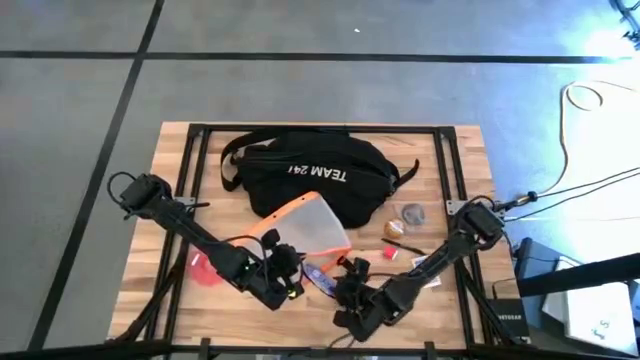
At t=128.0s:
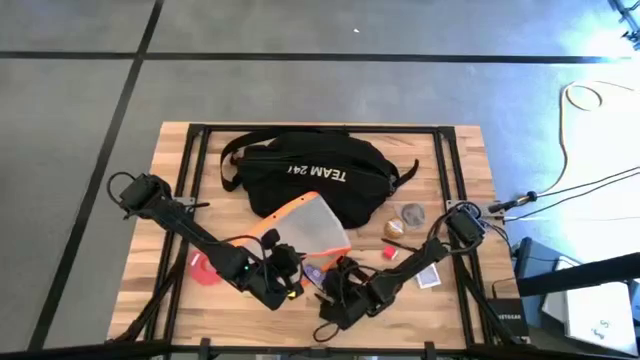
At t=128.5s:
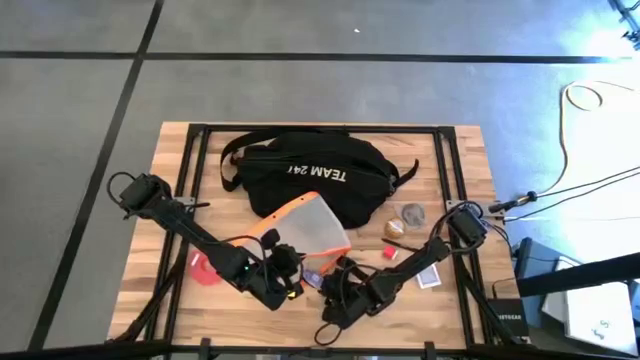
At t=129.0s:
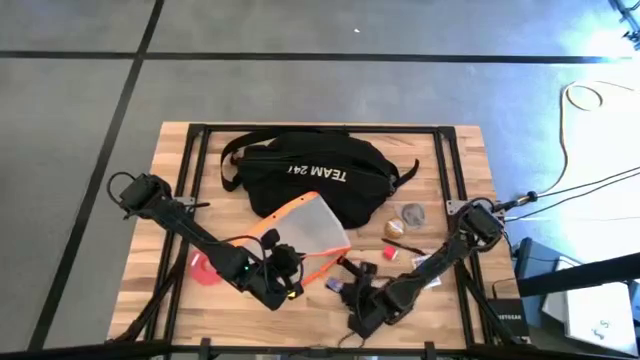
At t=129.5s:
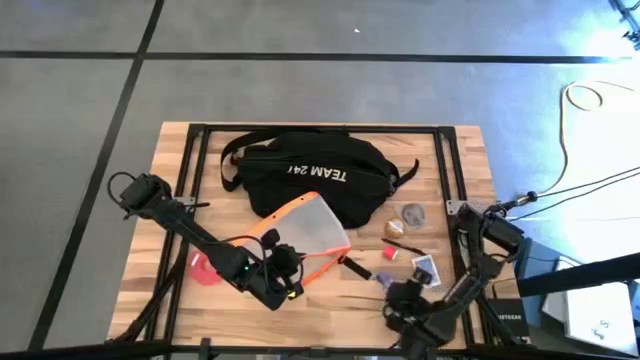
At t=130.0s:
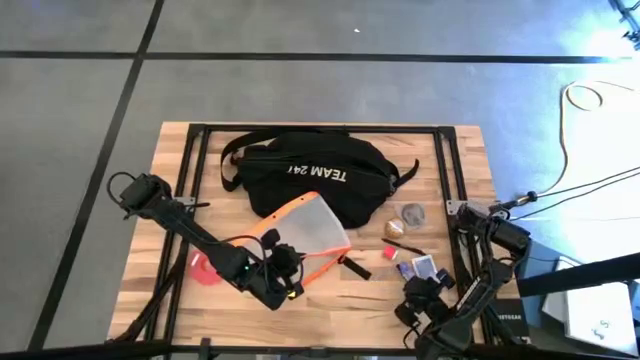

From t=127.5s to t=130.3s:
Task: Unpack backpack
Remove the chocolate bar from the white zip bag

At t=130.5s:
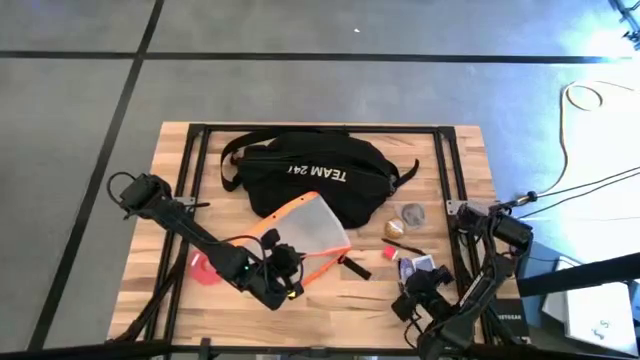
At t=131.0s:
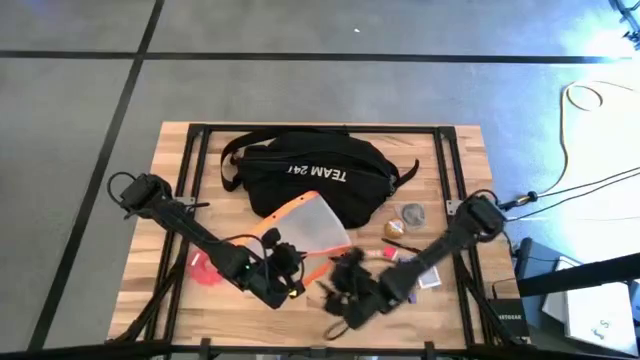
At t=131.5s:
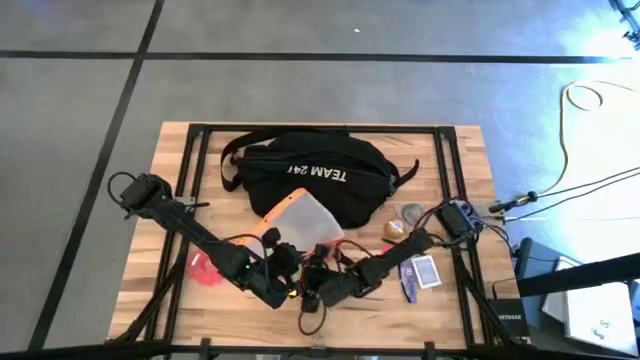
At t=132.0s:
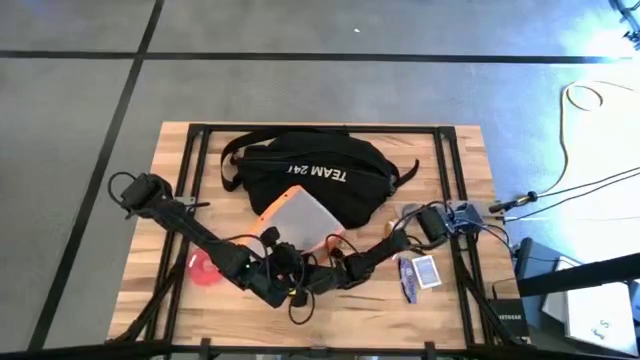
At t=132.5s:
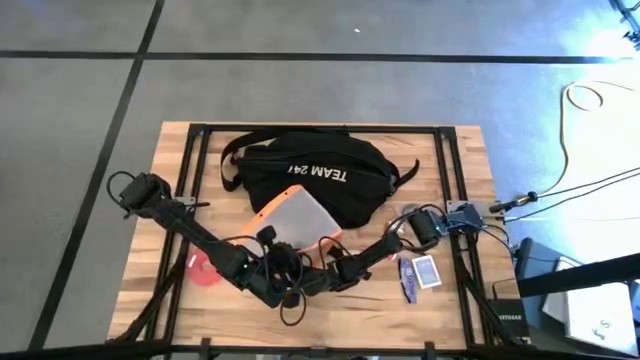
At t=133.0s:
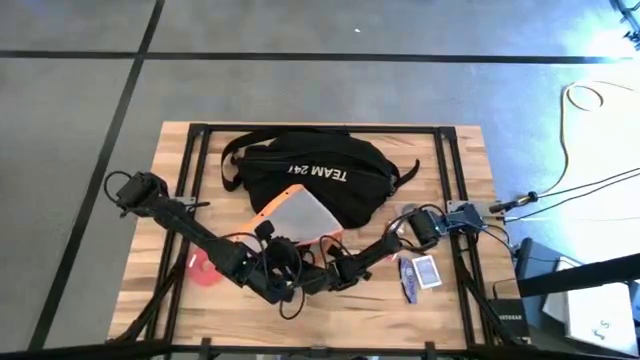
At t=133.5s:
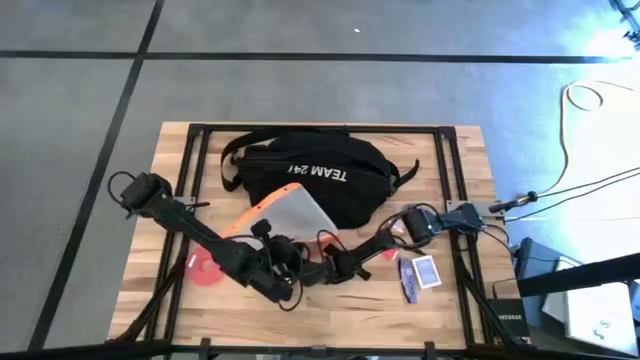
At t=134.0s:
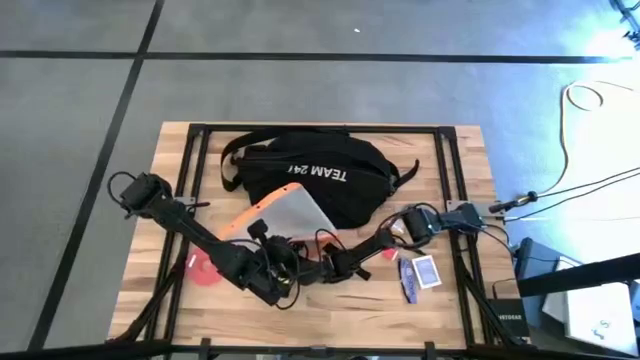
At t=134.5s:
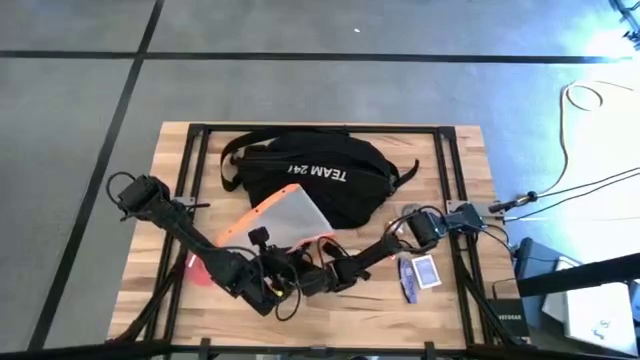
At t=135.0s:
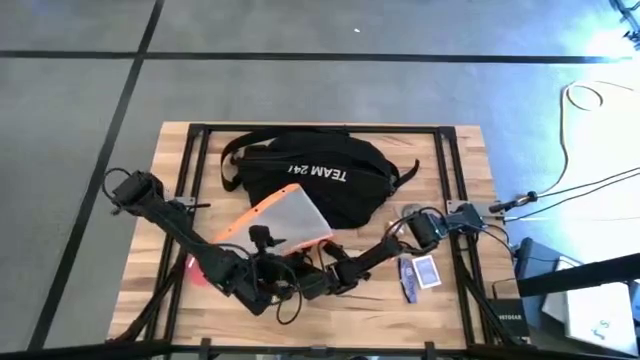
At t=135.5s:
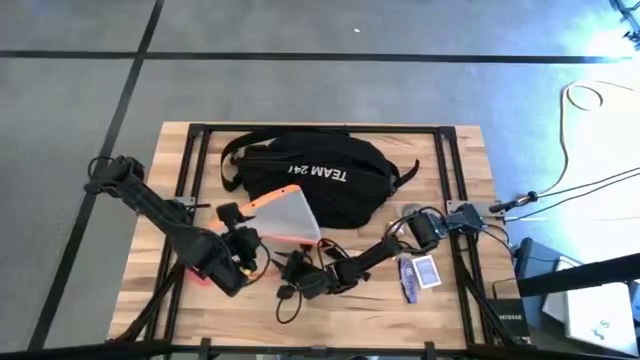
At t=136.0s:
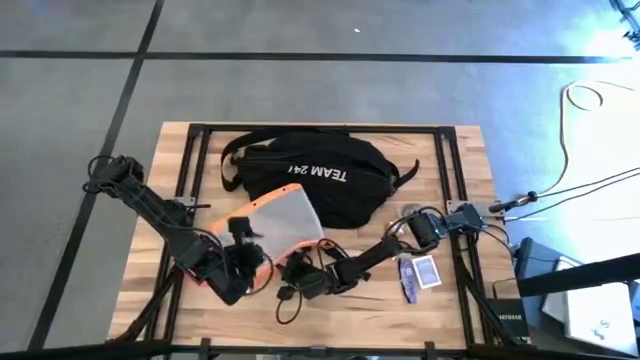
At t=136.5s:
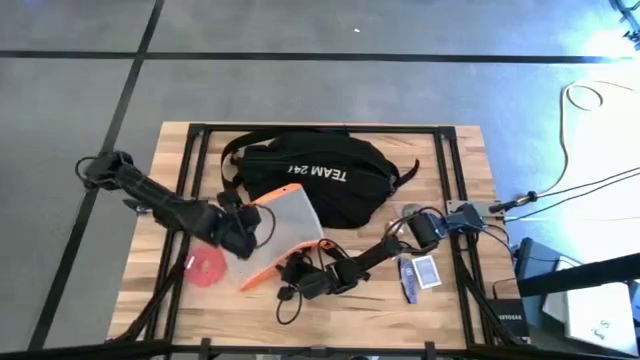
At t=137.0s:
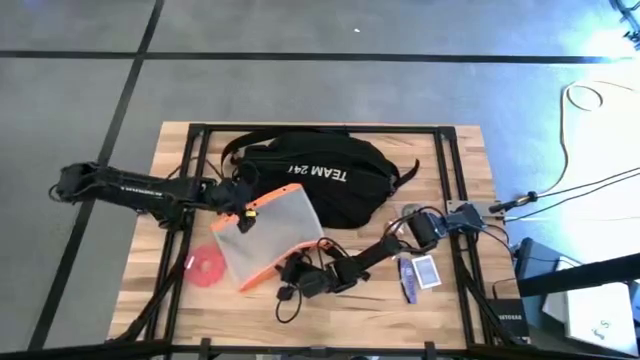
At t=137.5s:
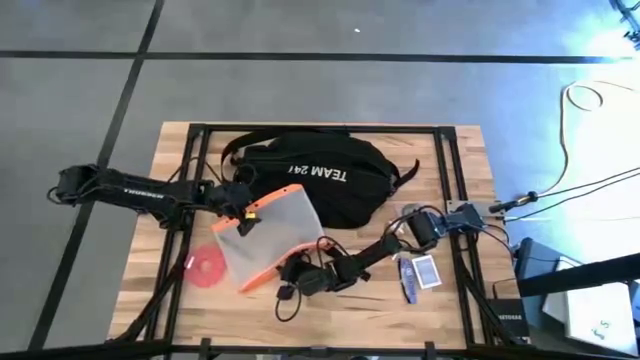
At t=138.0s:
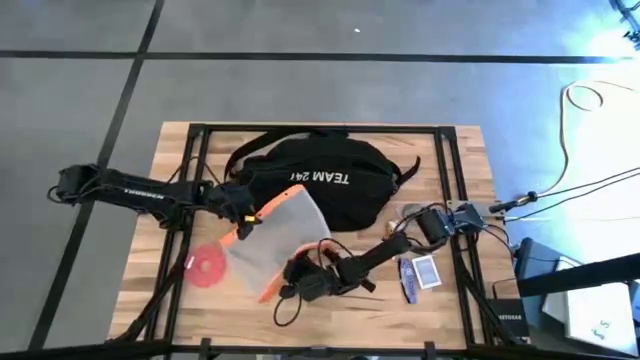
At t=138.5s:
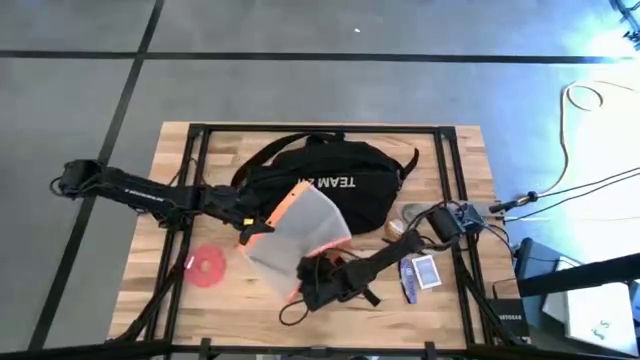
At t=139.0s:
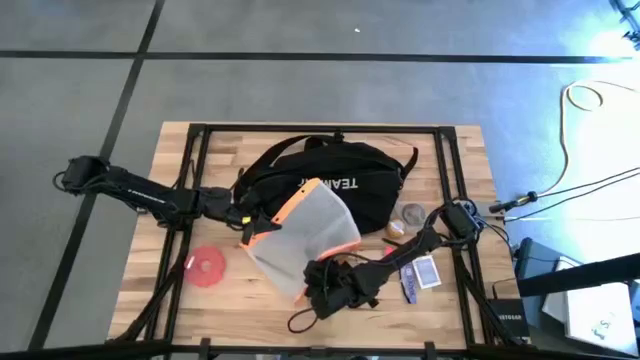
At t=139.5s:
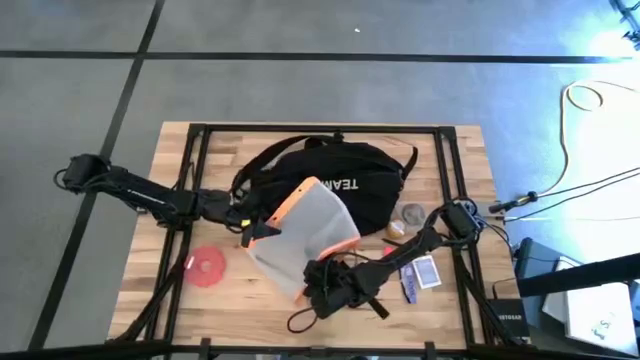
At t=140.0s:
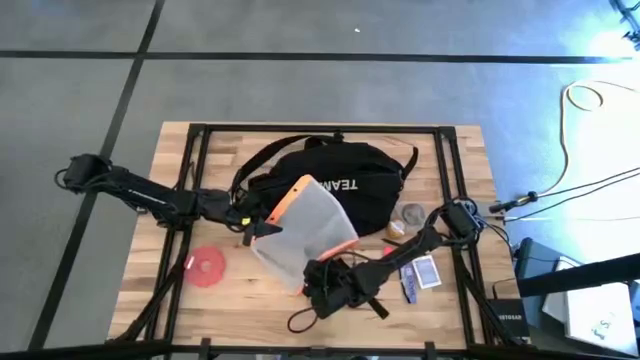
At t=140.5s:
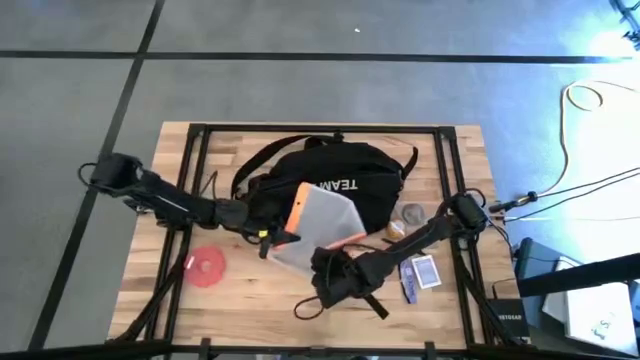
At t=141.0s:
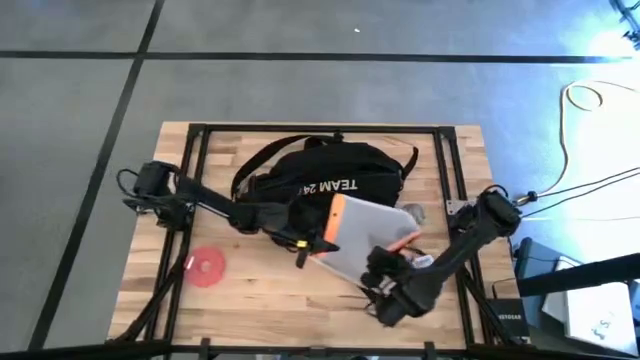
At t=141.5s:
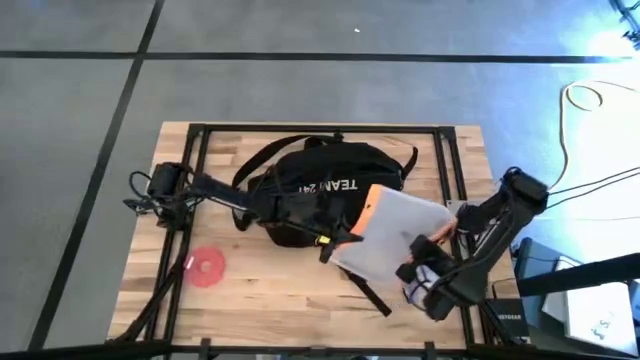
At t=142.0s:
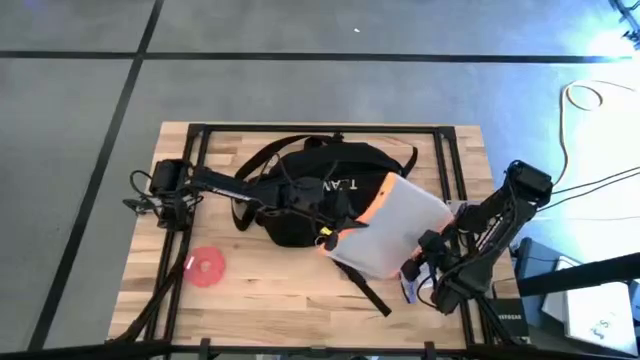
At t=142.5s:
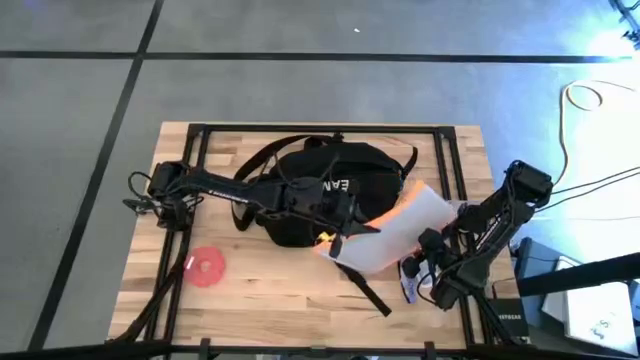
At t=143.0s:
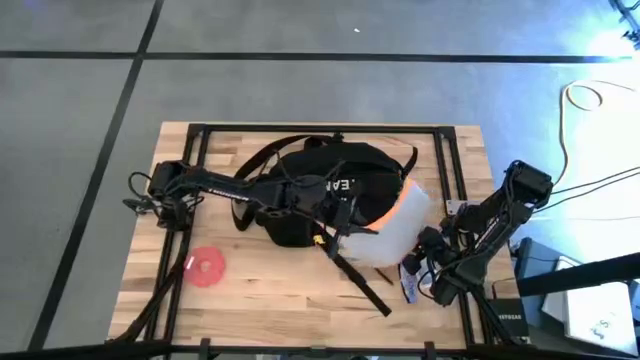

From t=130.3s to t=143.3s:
Remove the black pen from the white zip bag
